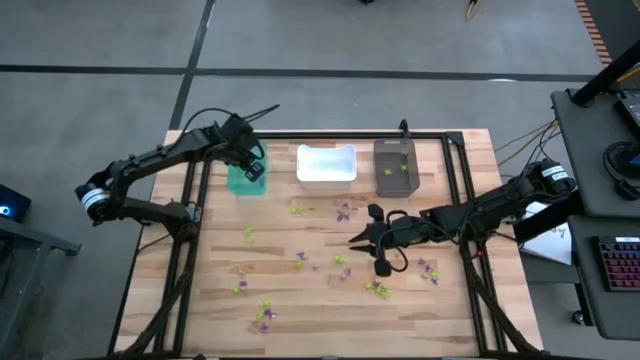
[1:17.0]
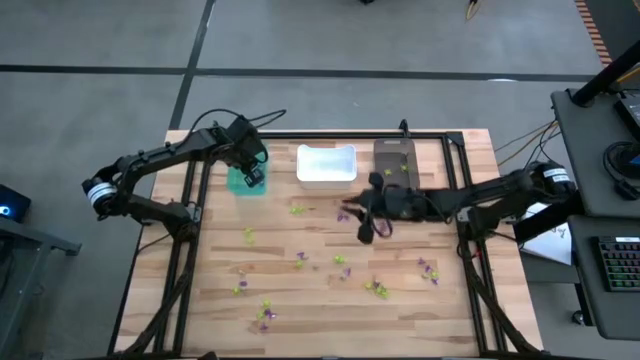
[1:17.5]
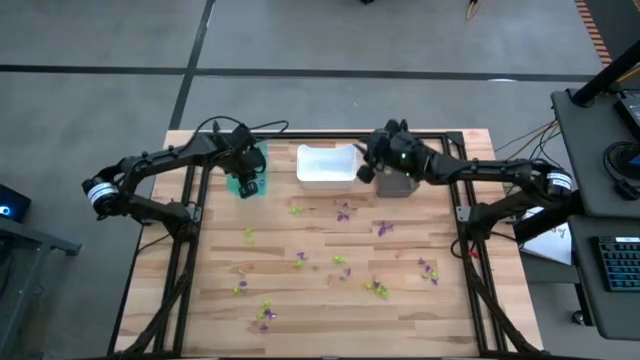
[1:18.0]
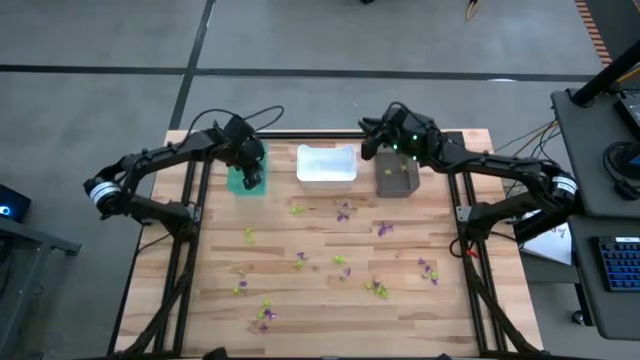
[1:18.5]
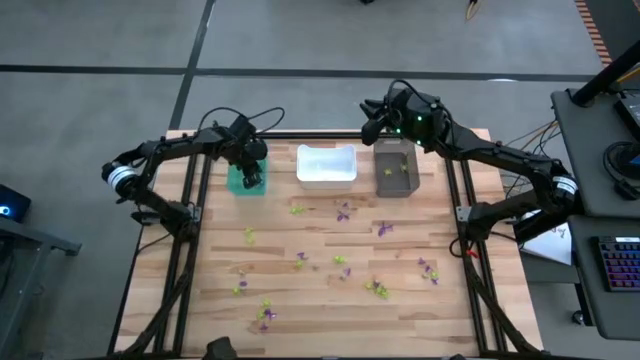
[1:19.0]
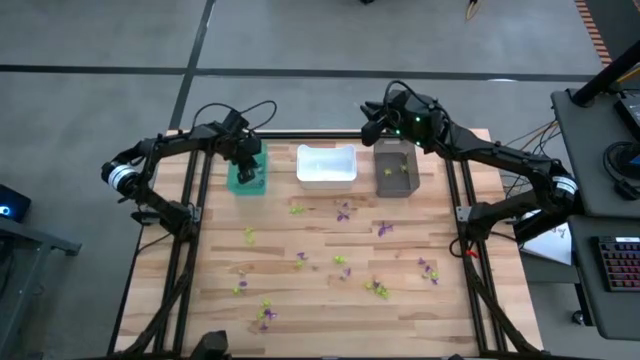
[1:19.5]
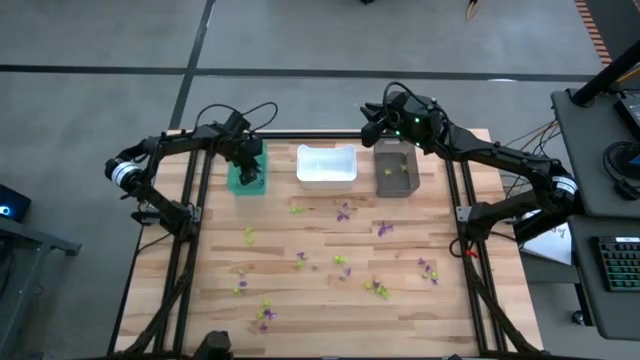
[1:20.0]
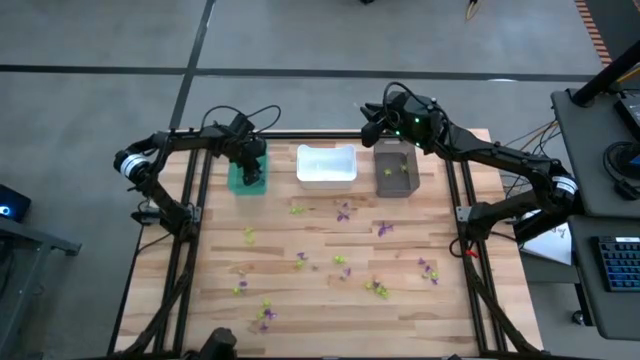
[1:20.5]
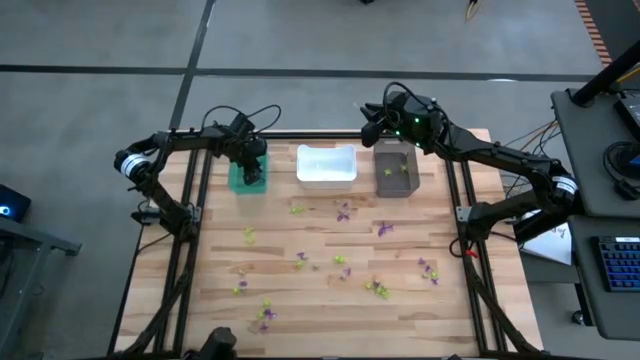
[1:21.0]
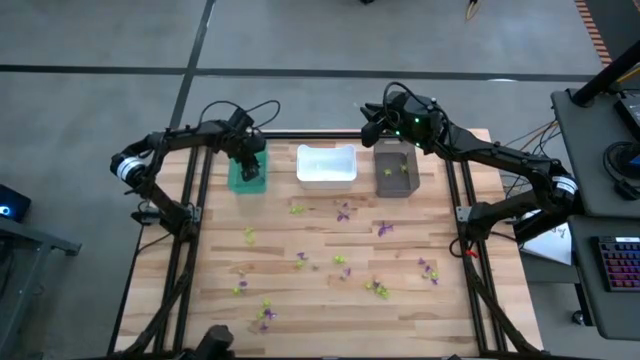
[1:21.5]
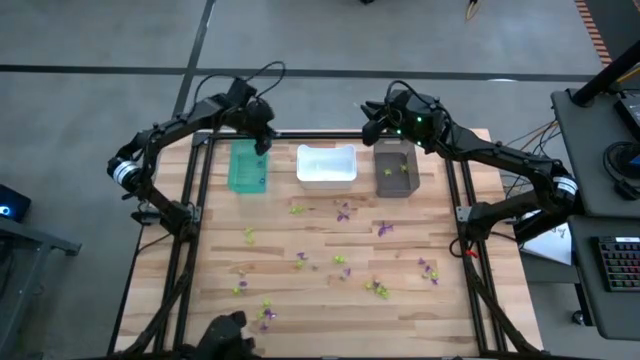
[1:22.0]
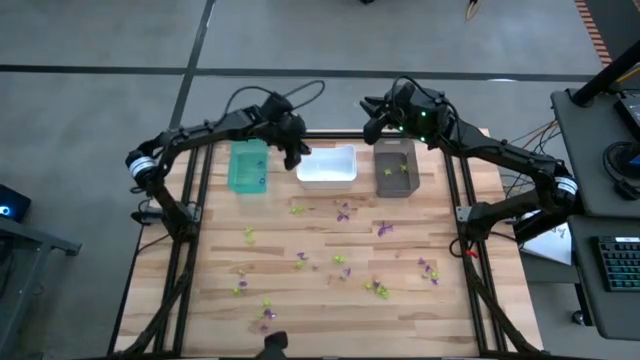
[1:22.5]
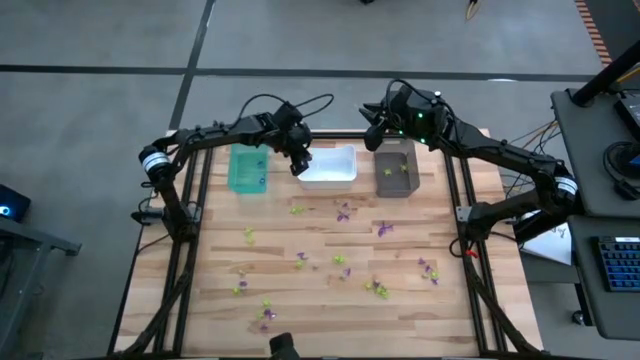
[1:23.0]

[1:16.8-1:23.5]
Task: Sort Halloween decoration
Put the white skull toy into the white bin

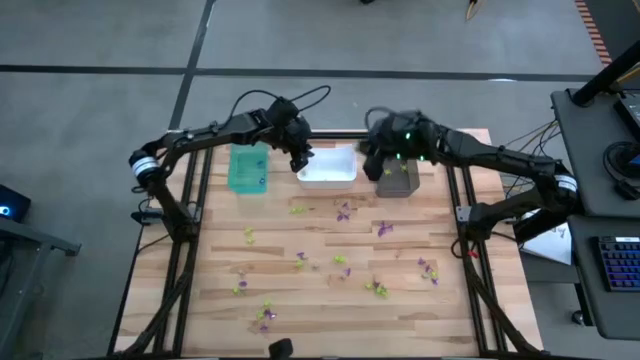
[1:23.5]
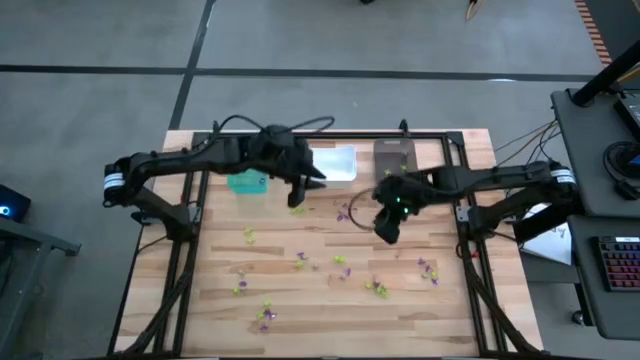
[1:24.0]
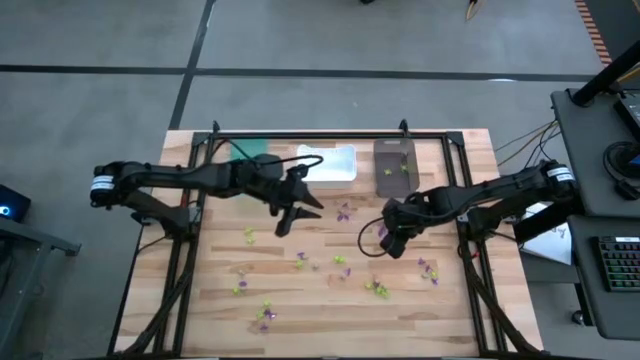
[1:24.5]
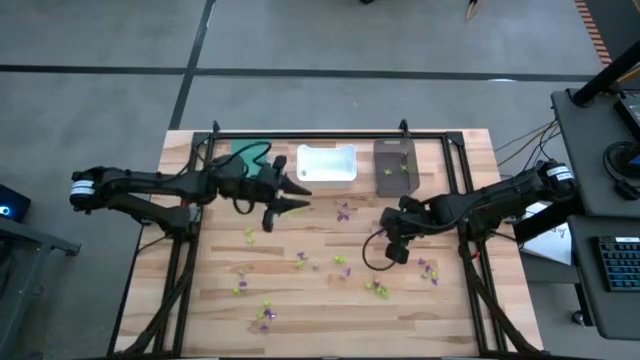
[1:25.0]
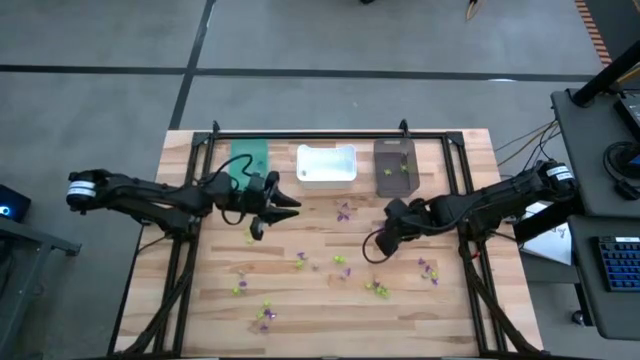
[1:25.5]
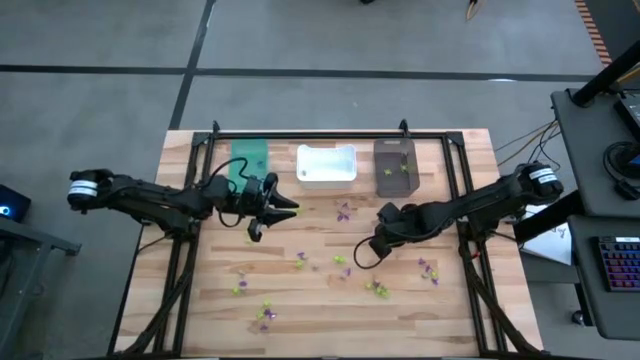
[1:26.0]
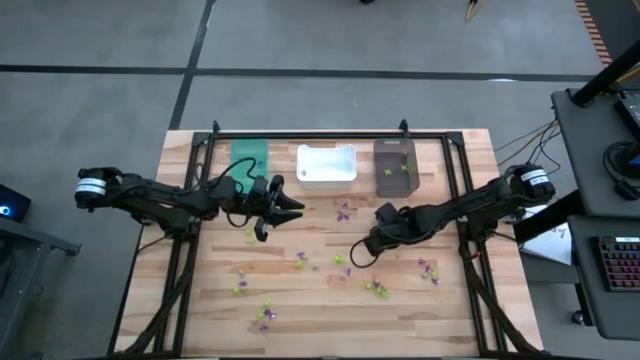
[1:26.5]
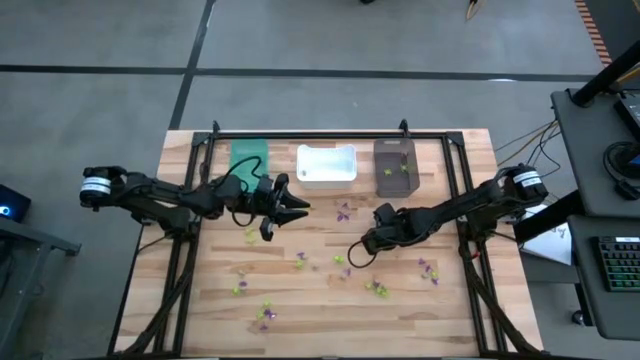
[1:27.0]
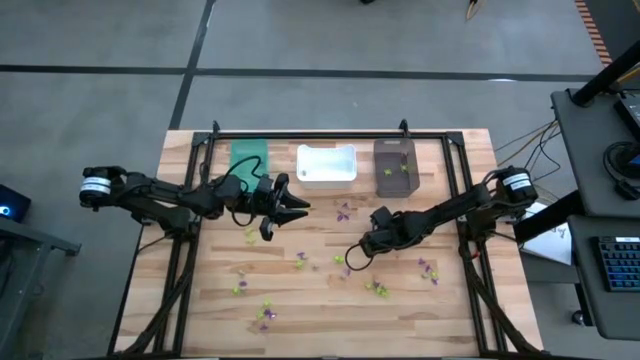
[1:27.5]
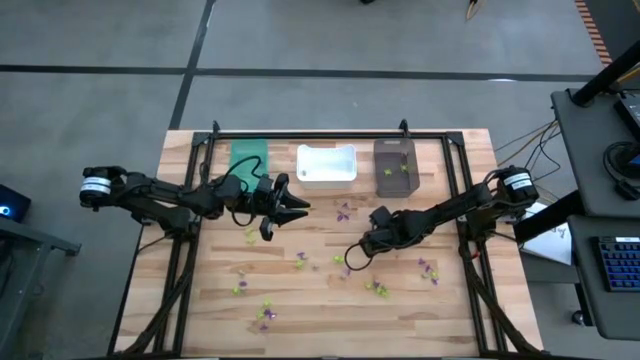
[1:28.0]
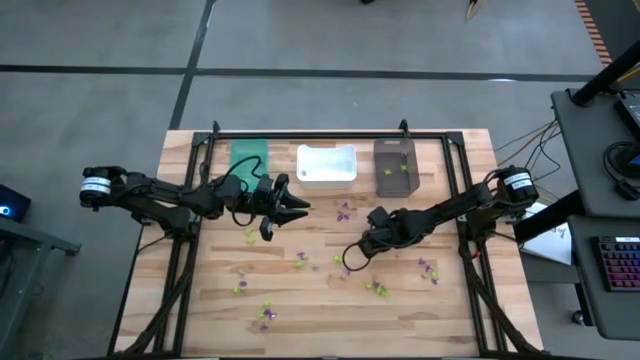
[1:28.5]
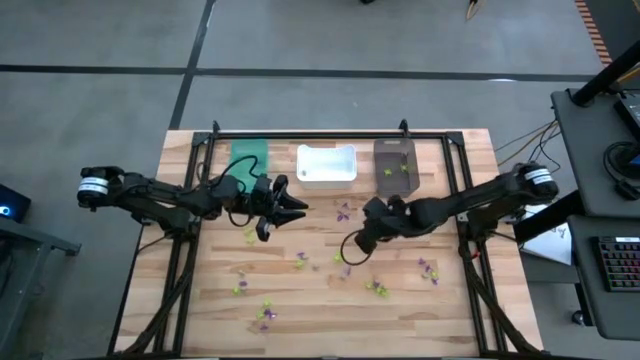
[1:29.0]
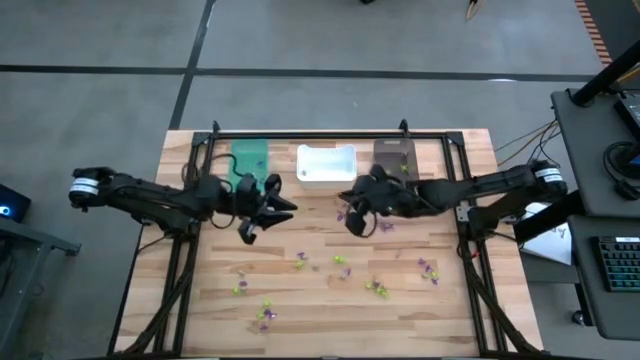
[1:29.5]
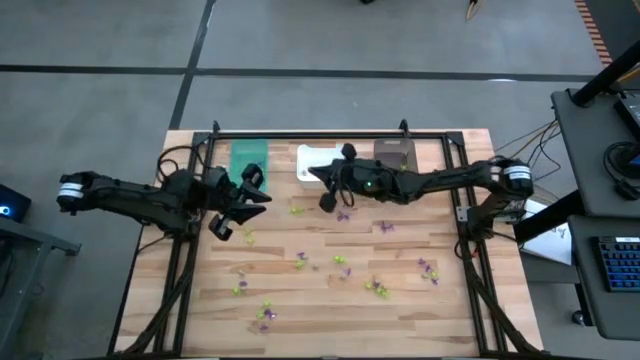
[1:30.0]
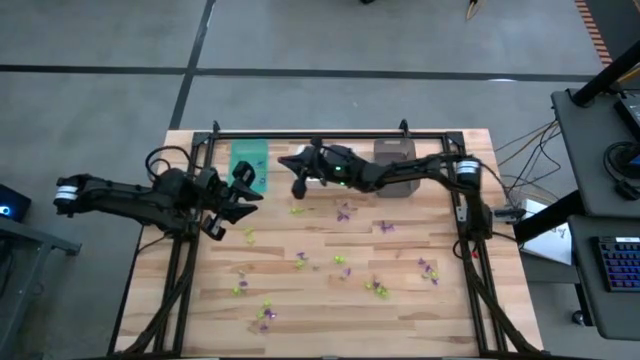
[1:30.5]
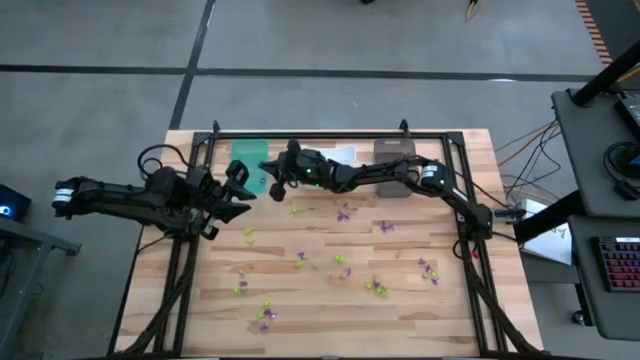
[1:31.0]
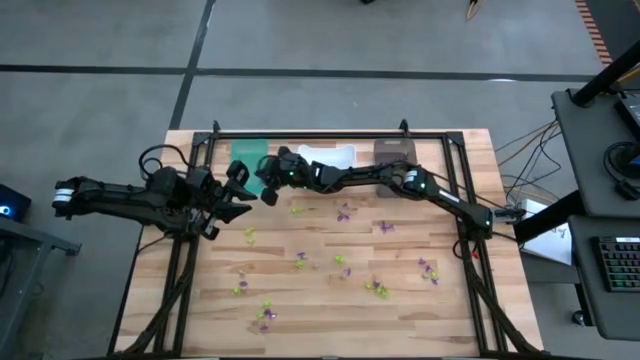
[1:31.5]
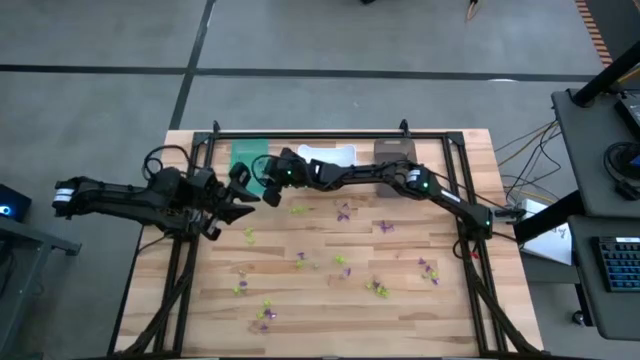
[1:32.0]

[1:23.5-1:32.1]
Put the purple witch hat toy into the light blue bin

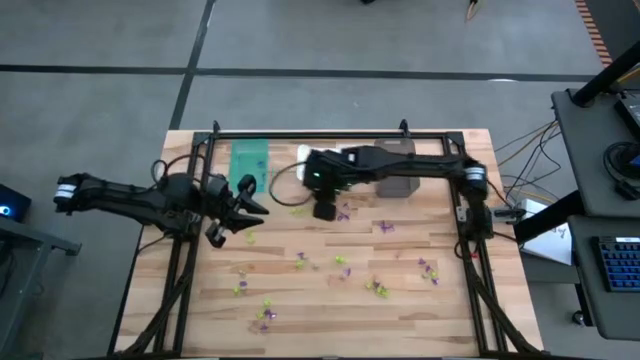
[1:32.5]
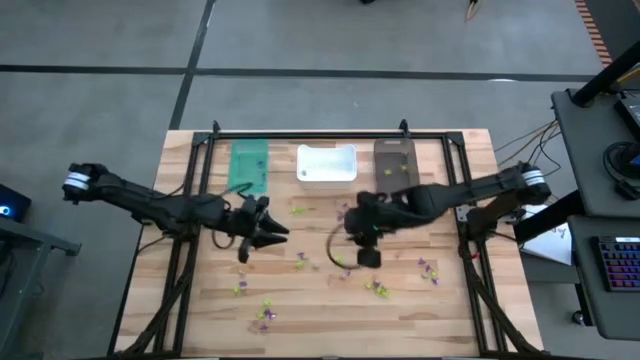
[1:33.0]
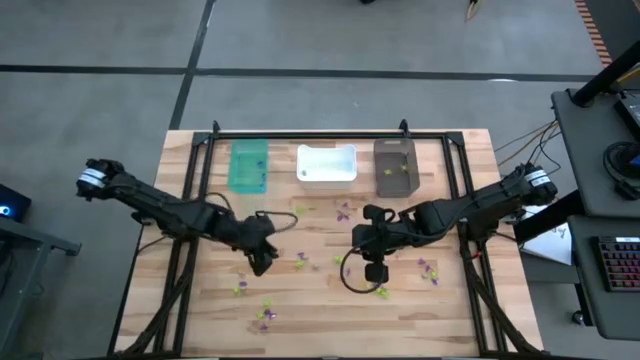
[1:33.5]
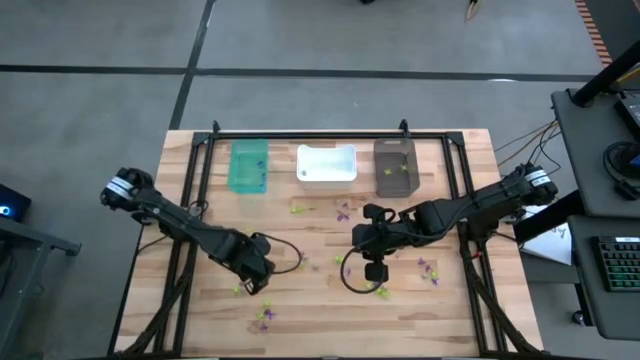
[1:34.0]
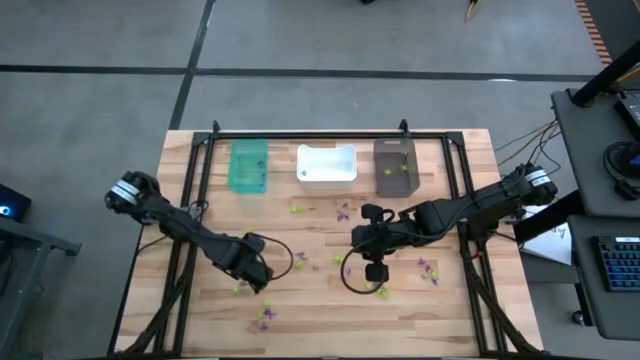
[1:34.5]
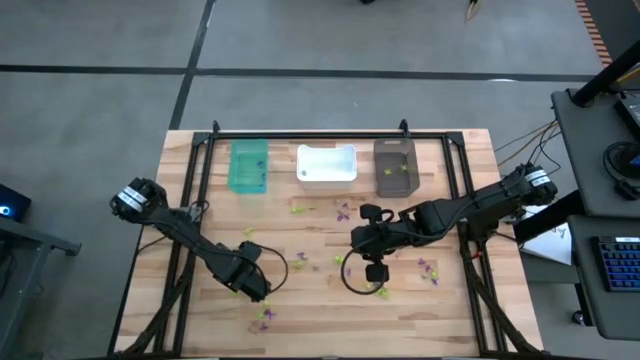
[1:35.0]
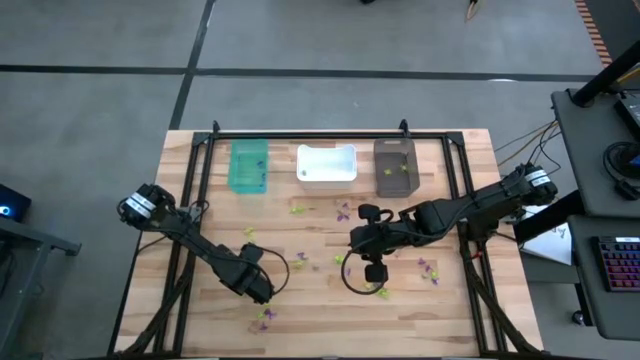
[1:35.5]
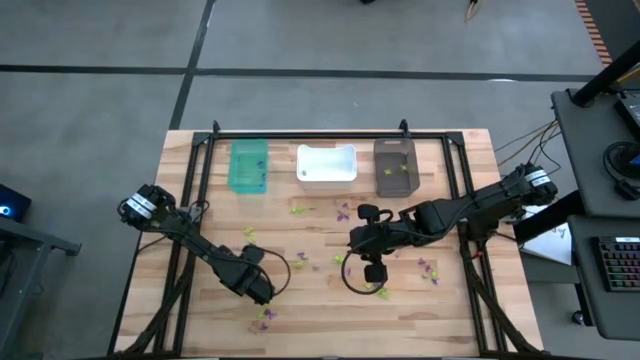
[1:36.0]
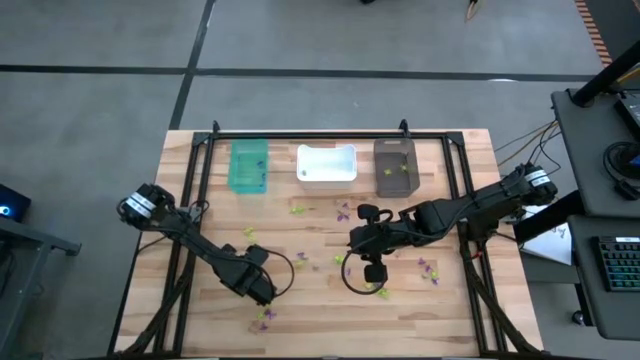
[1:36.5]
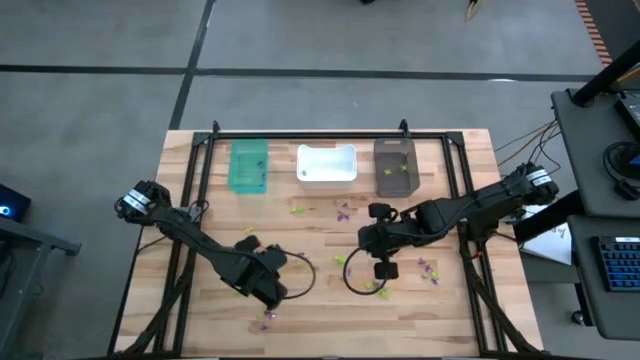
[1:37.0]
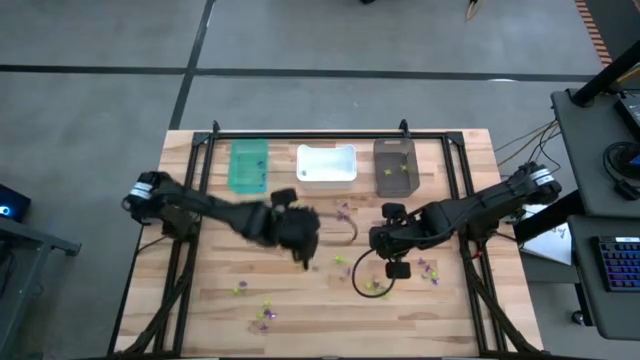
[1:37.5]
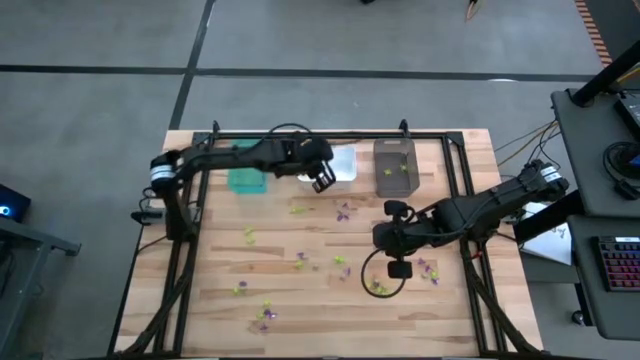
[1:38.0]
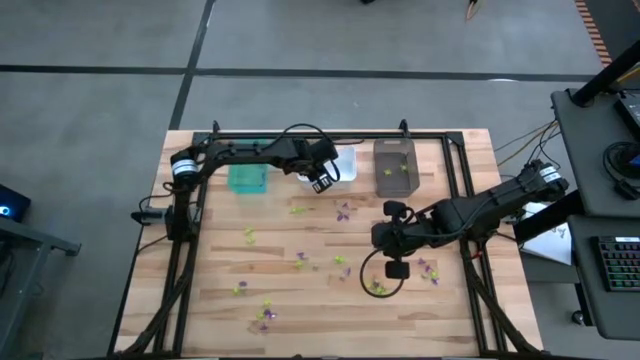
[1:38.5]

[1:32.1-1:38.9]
Put the white skull toy into the white bin
